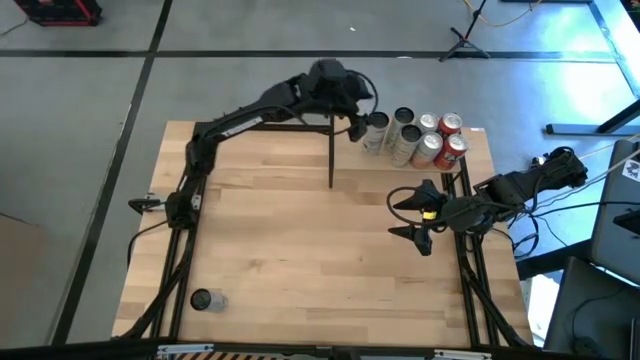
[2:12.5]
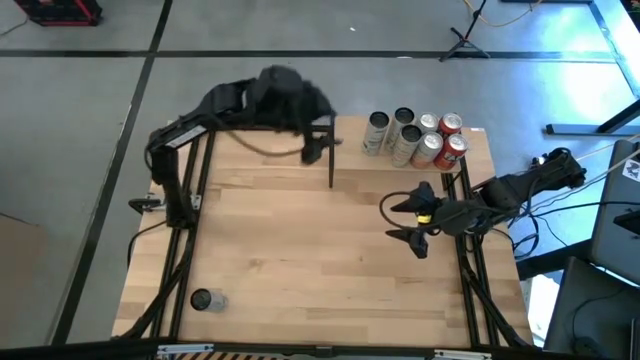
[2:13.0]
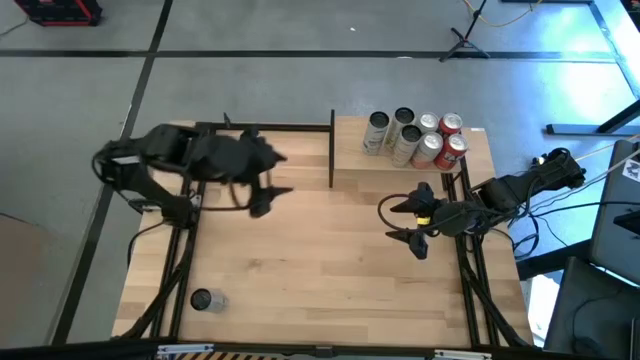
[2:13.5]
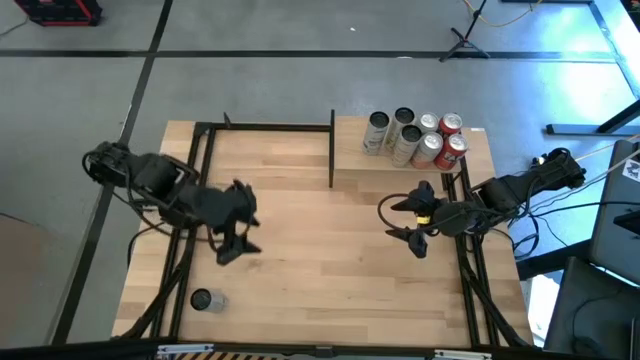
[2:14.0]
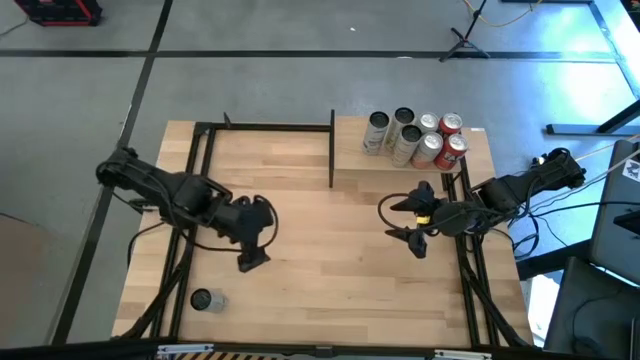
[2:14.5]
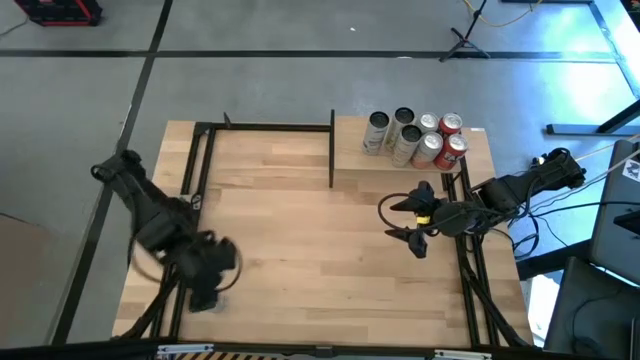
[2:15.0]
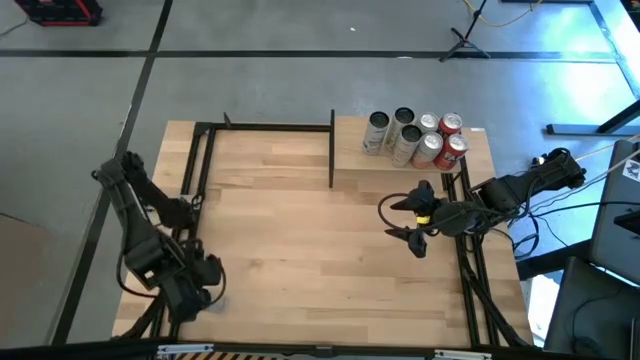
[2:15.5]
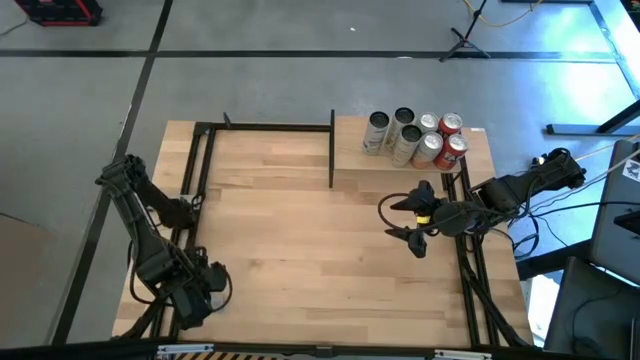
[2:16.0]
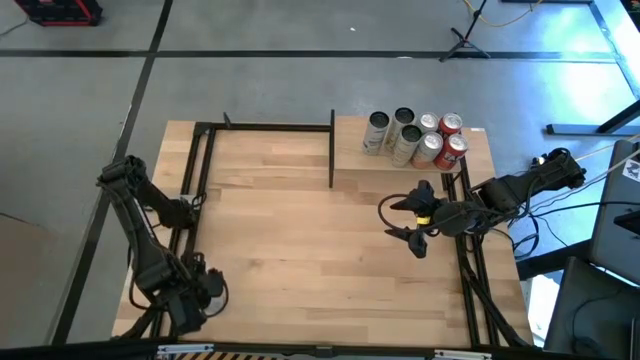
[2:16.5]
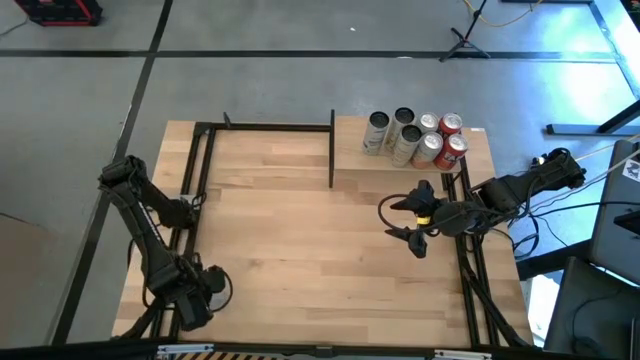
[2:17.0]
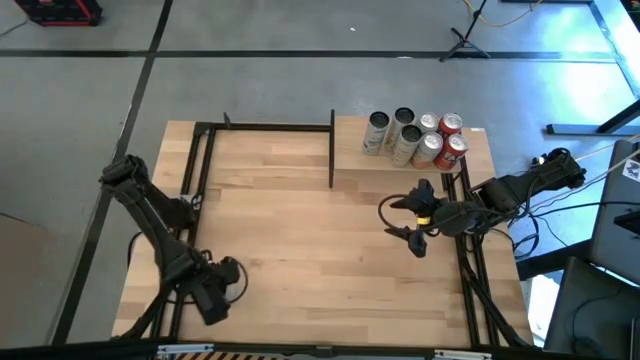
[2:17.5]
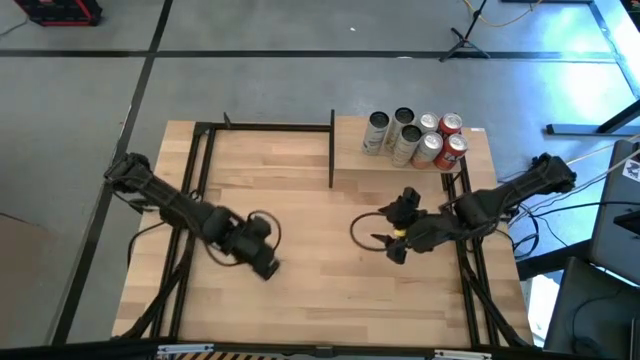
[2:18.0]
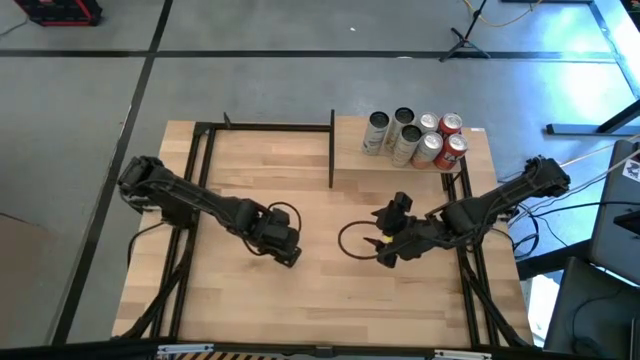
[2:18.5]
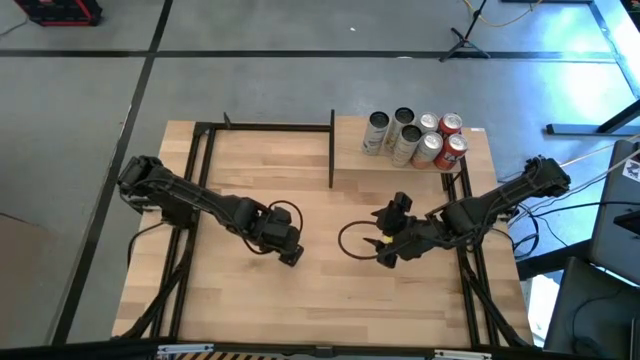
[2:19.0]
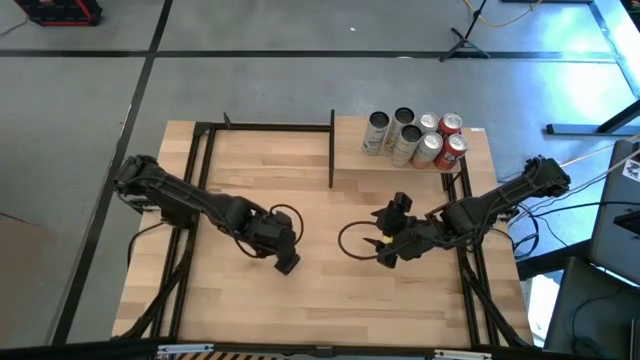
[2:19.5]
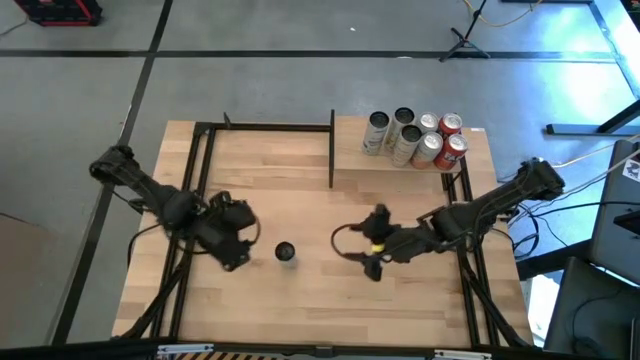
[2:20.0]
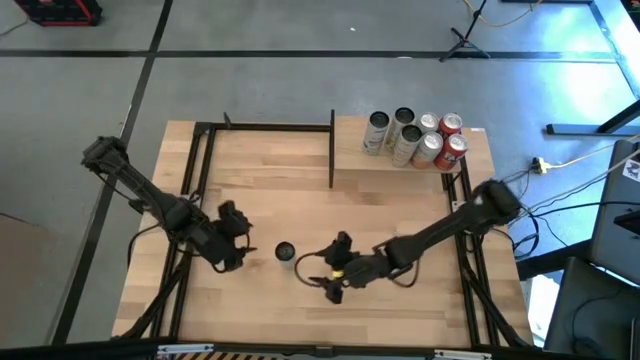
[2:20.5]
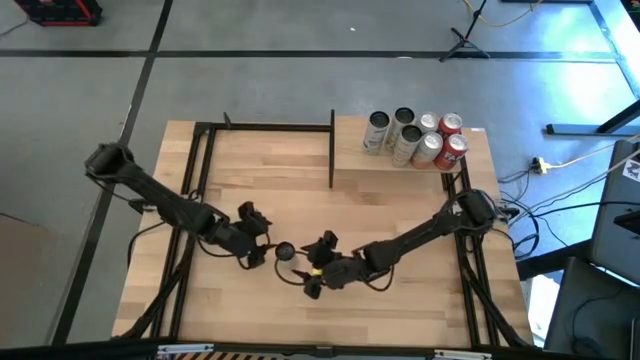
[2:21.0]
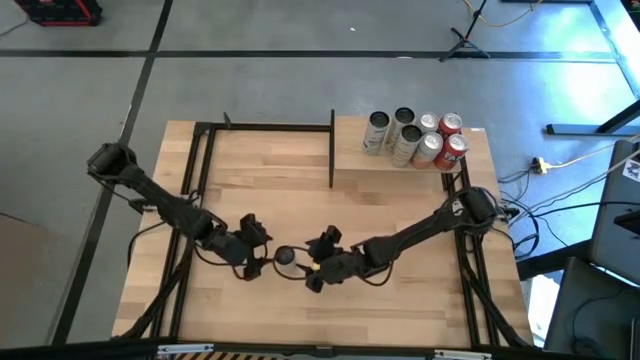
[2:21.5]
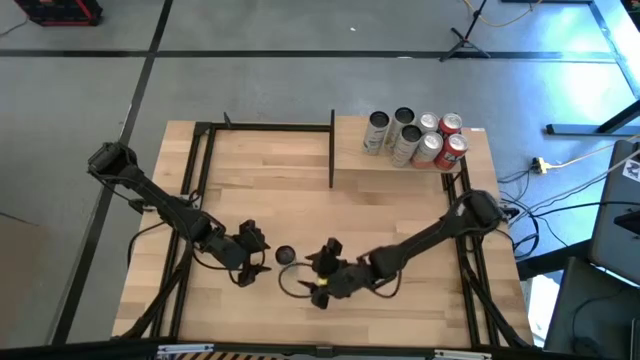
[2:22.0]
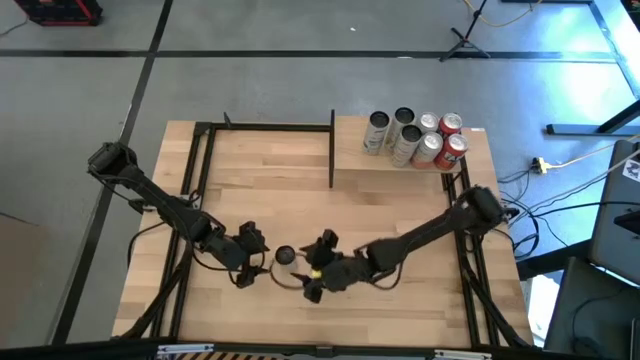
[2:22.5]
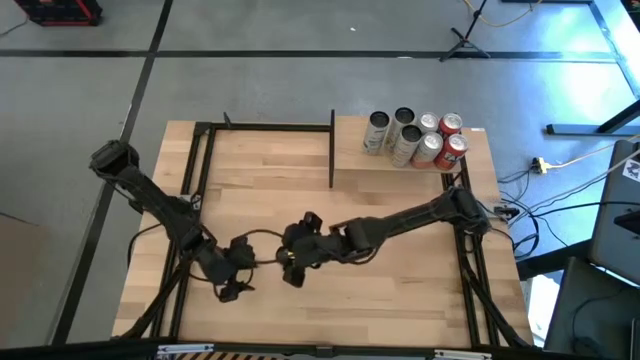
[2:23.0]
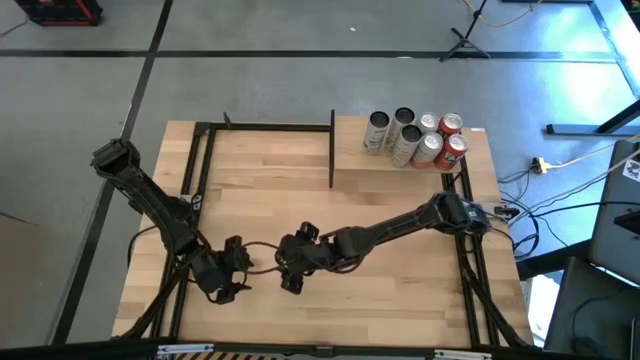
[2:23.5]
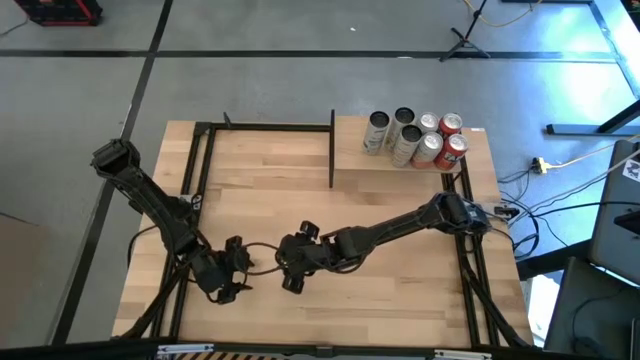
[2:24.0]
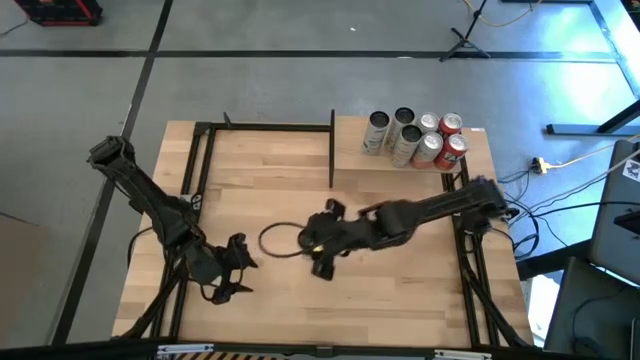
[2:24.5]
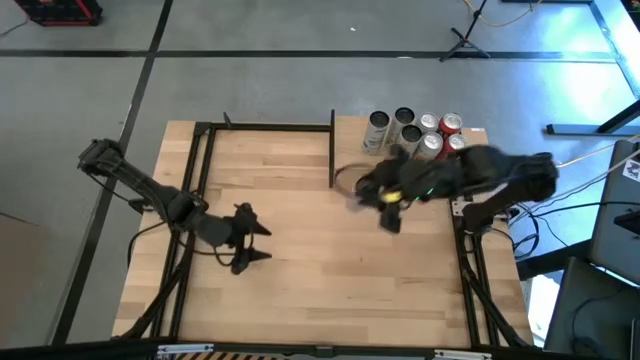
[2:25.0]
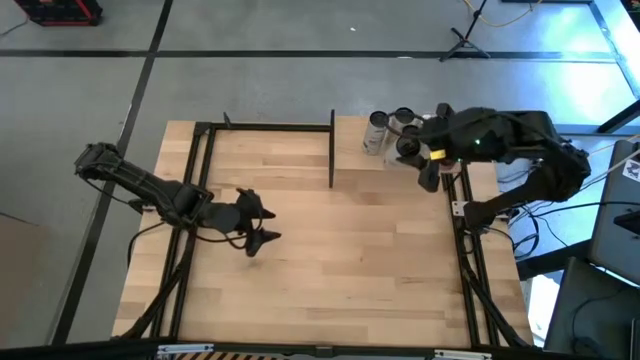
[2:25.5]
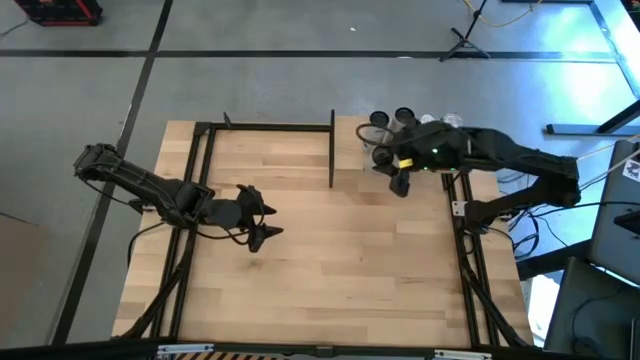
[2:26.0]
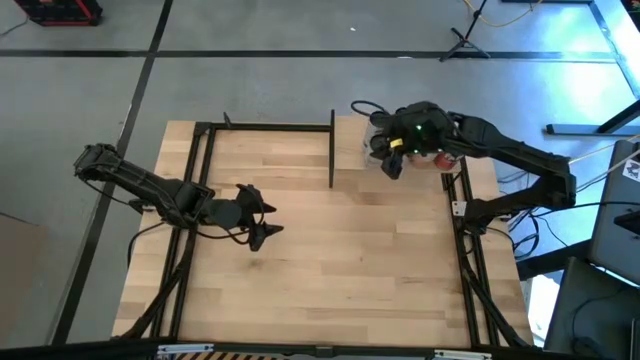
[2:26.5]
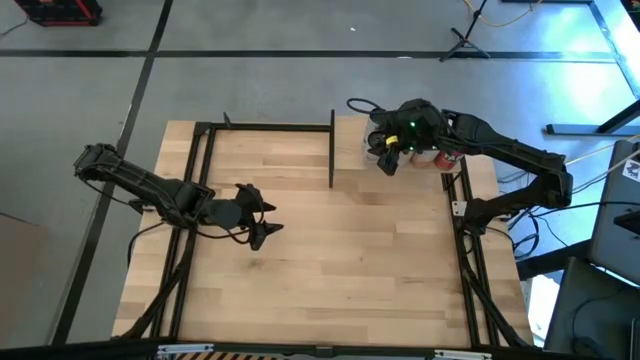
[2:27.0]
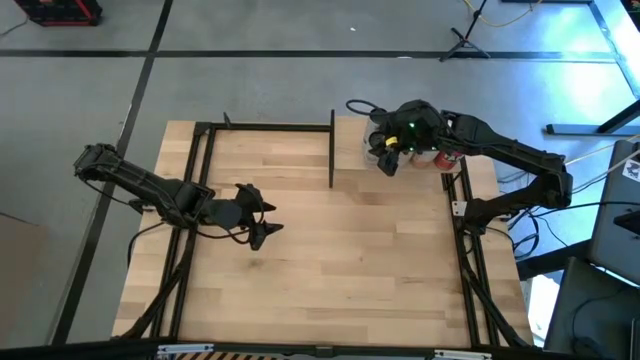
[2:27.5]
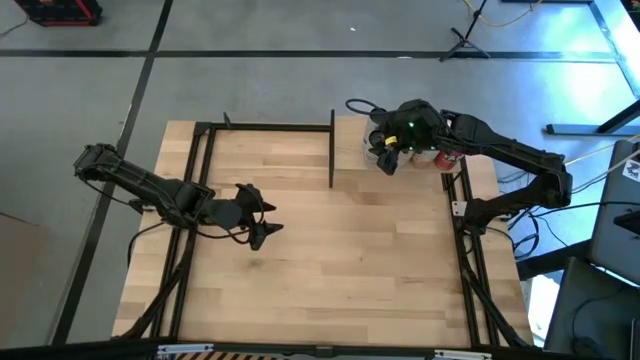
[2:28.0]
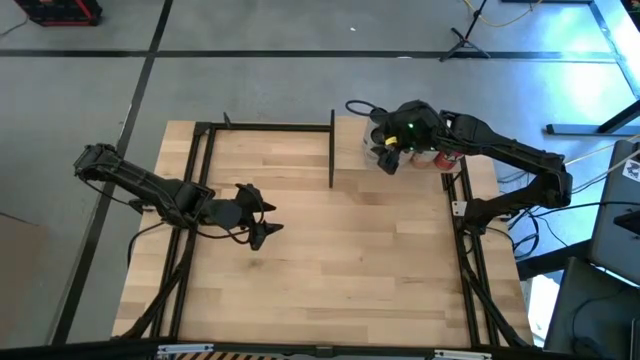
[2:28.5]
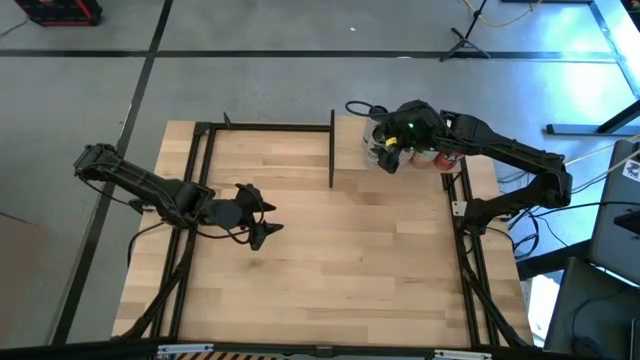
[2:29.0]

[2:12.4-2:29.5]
Task: Place canned beverage on shelf
Put the white blue soda can on the shelf aligned with the other white blue soda can

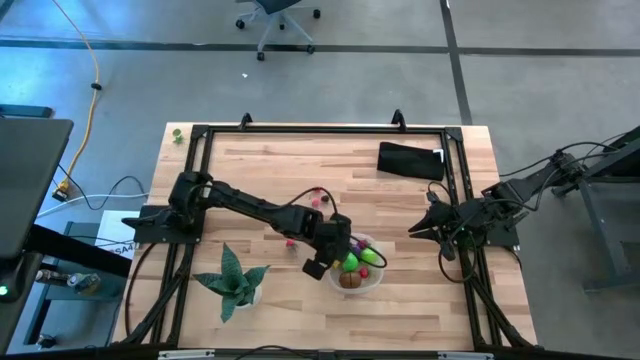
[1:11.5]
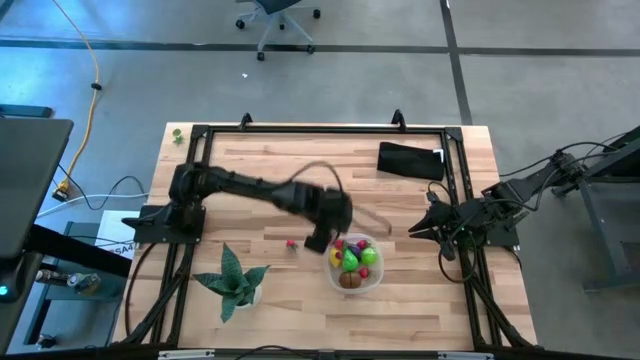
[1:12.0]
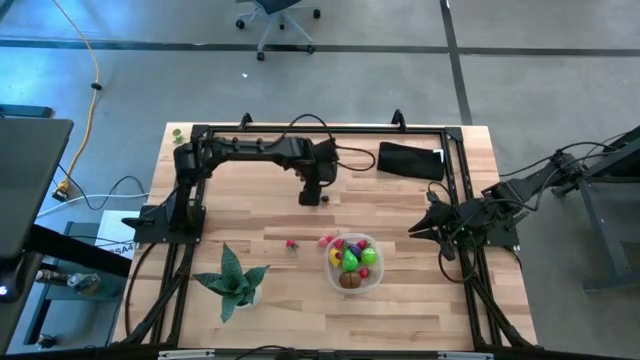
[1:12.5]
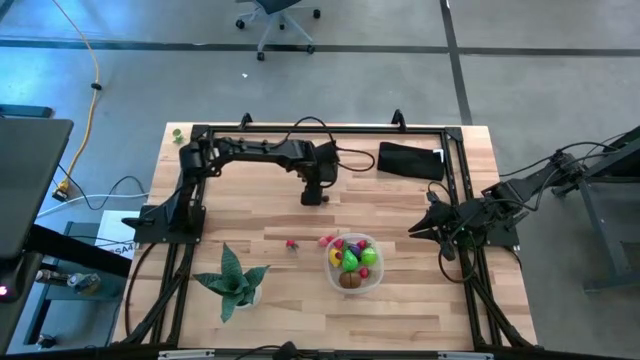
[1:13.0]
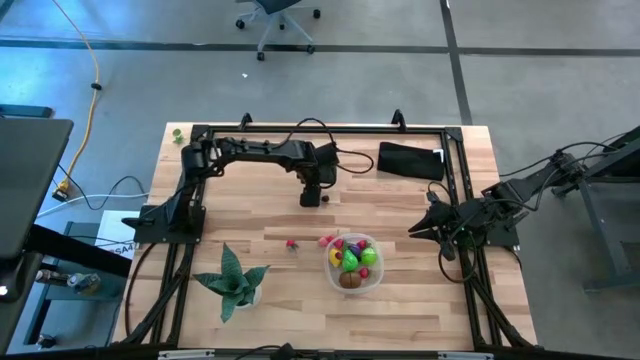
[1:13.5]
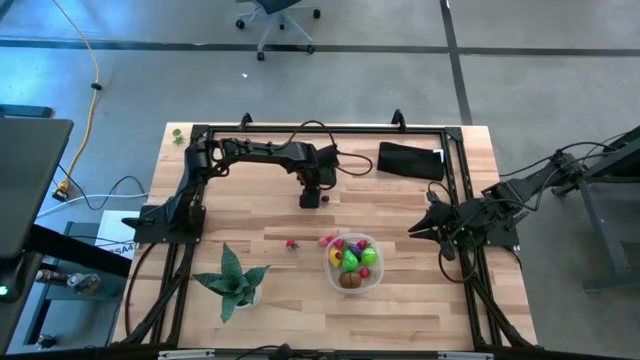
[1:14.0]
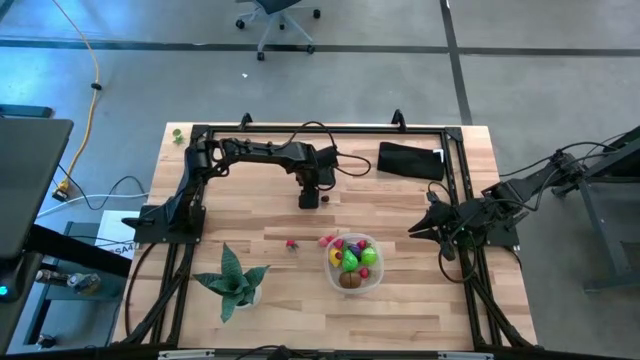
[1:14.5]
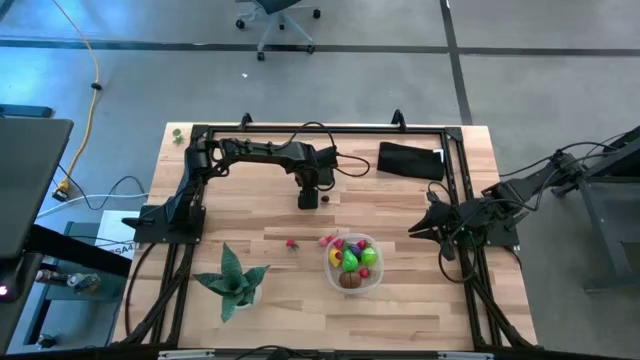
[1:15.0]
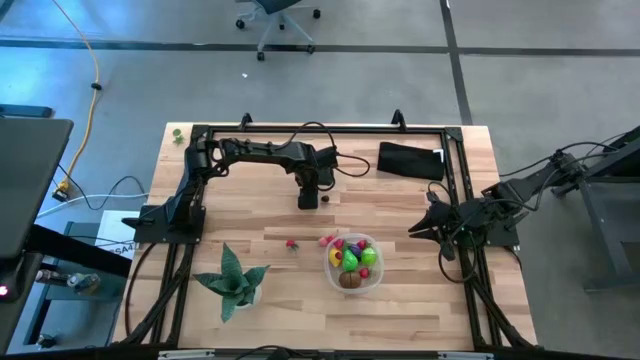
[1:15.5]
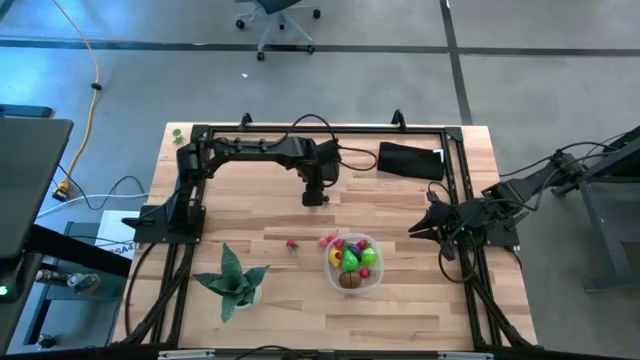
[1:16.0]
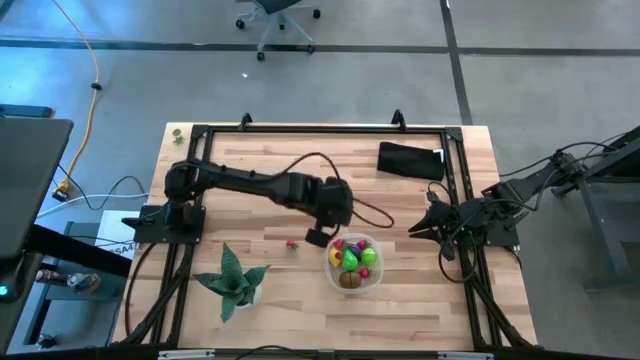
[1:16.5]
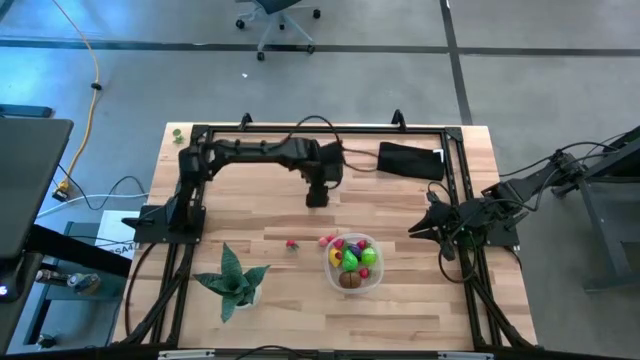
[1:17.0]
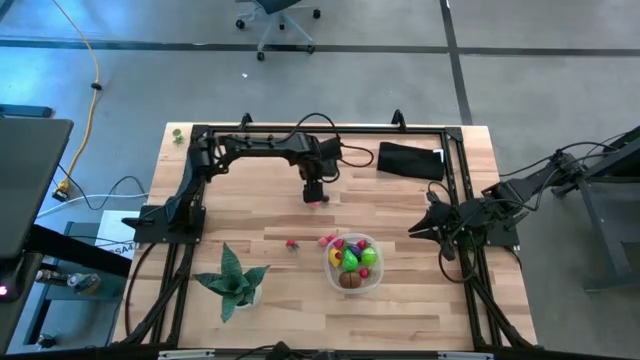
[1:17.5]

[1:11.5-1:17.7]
Task: Pick and placing Produce into tupperware
Put the cherry into the transparent bin
